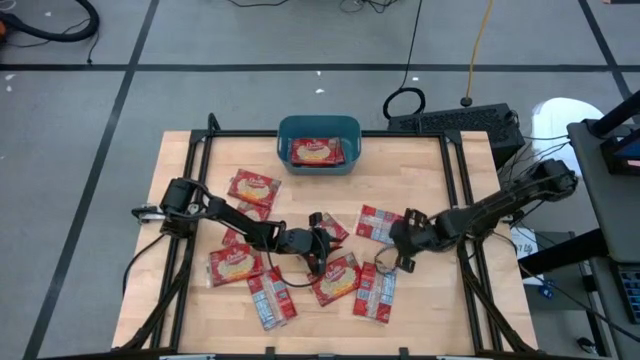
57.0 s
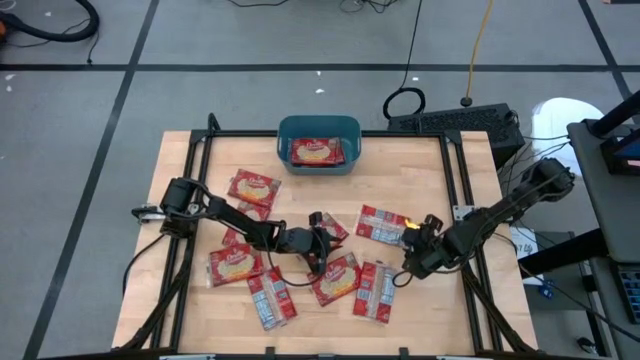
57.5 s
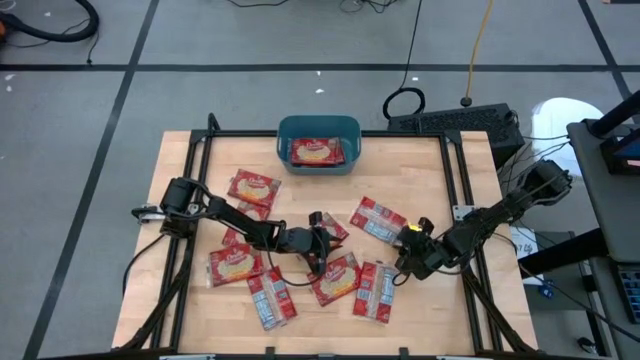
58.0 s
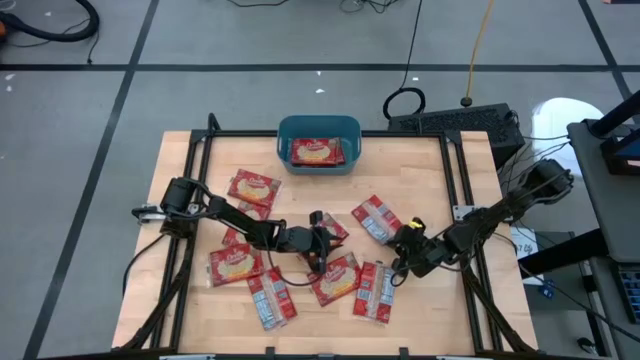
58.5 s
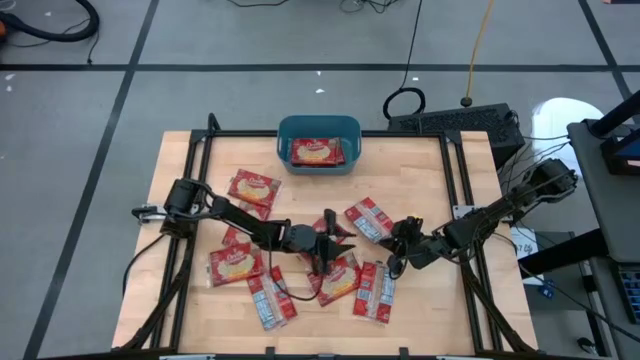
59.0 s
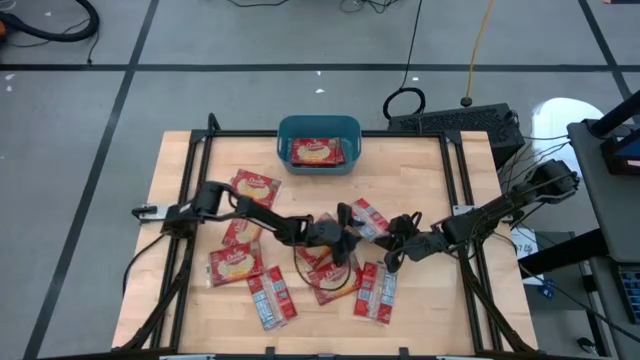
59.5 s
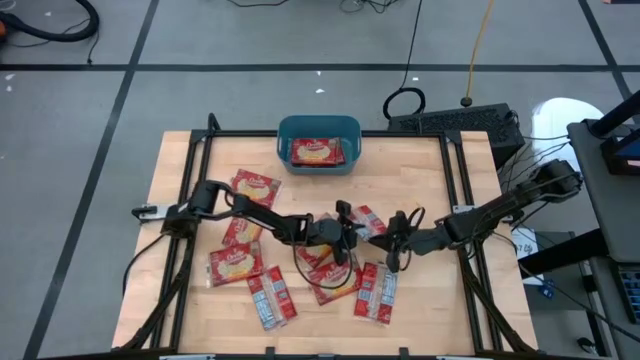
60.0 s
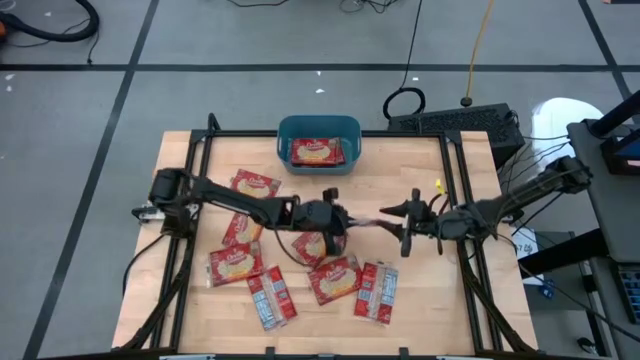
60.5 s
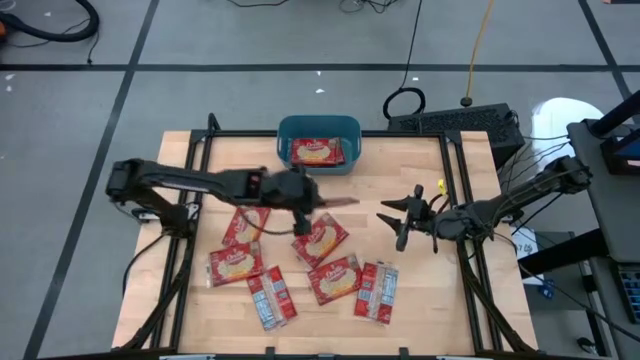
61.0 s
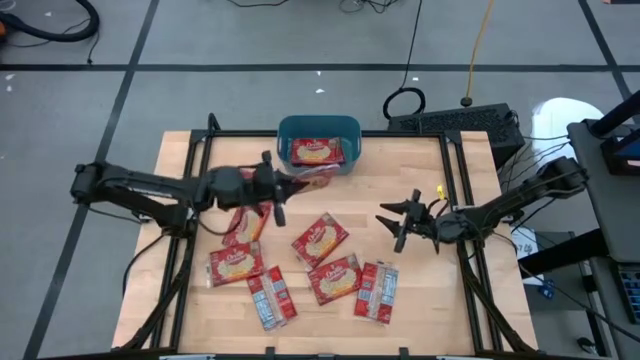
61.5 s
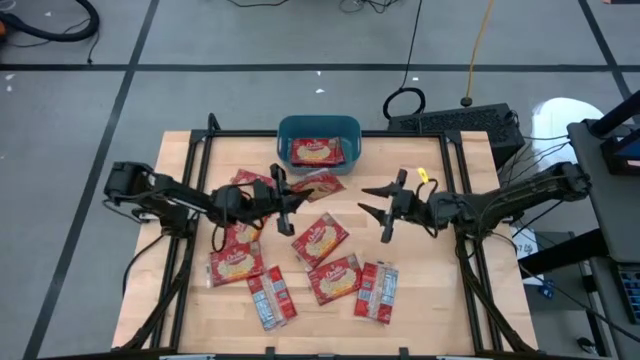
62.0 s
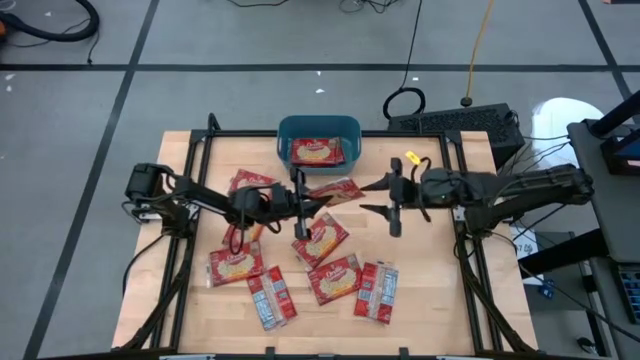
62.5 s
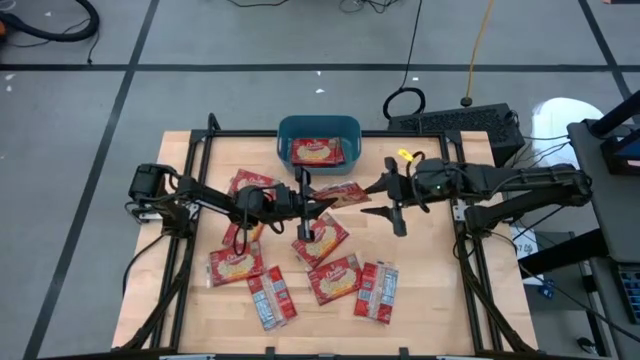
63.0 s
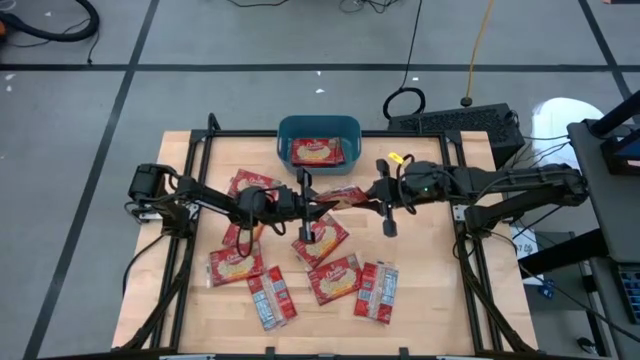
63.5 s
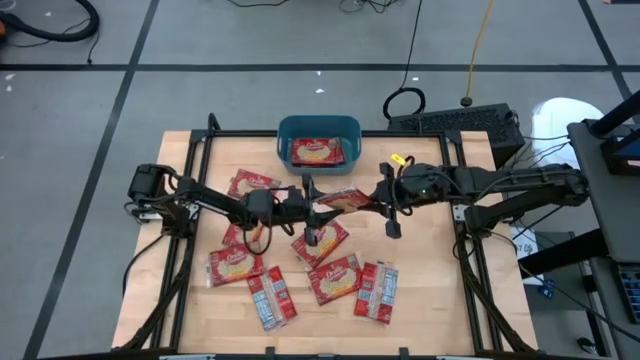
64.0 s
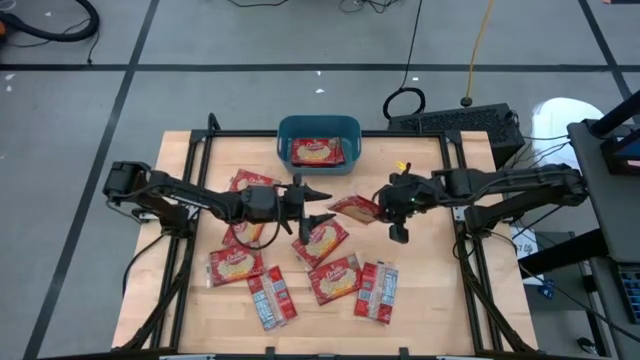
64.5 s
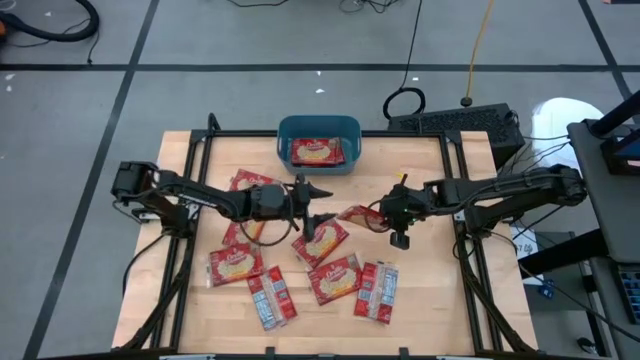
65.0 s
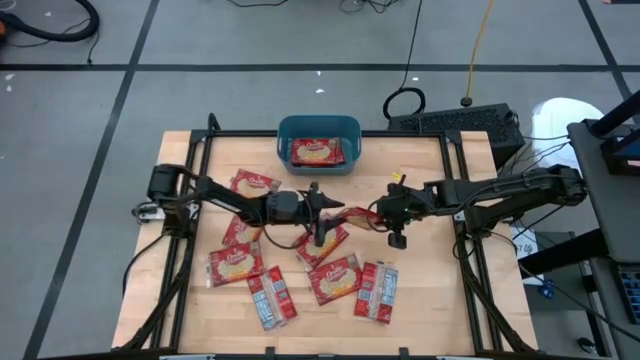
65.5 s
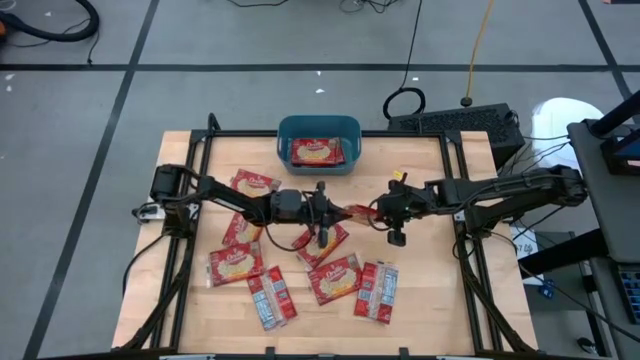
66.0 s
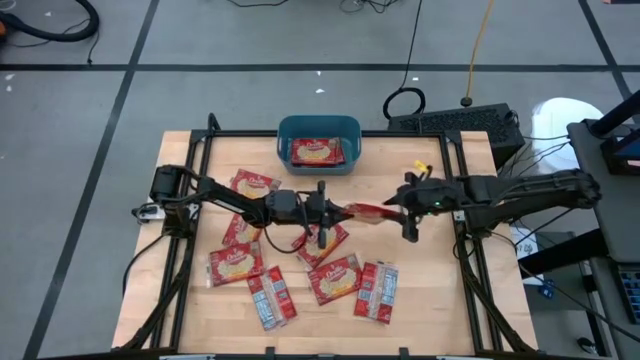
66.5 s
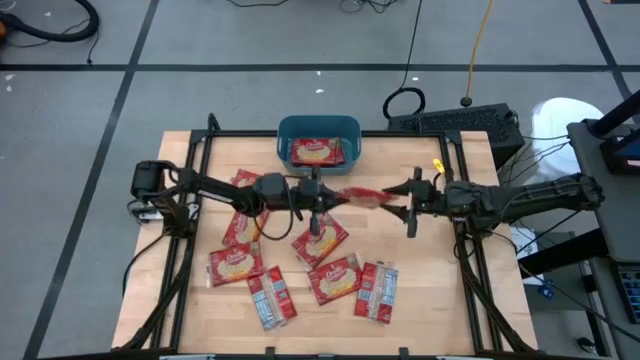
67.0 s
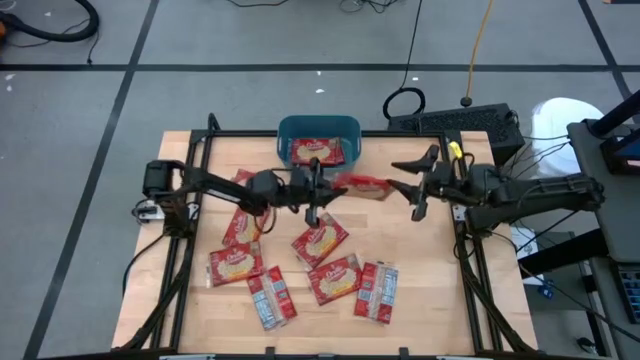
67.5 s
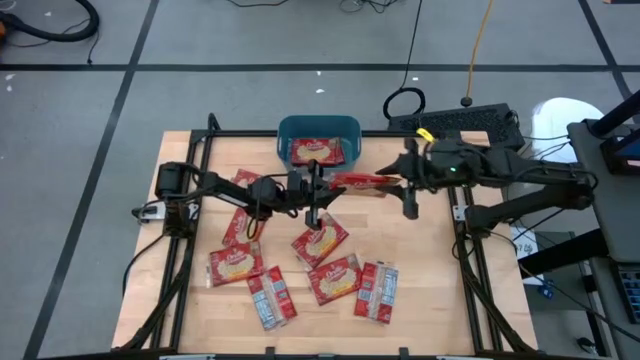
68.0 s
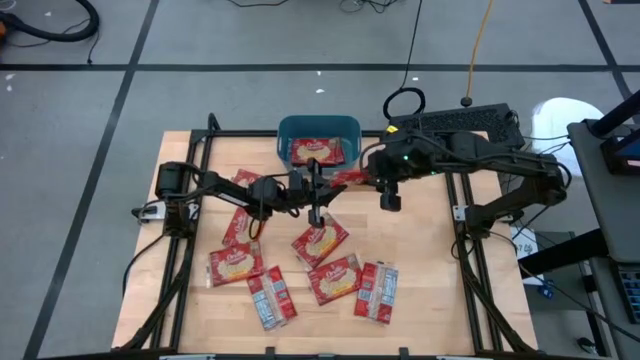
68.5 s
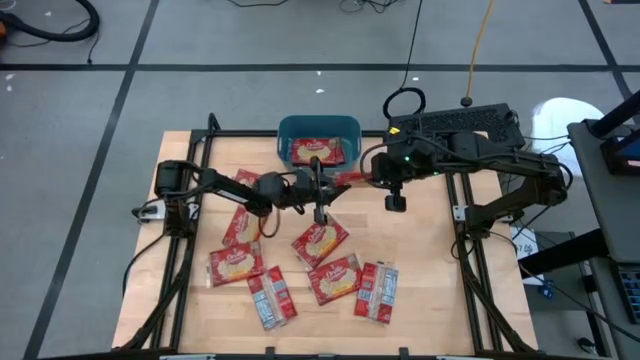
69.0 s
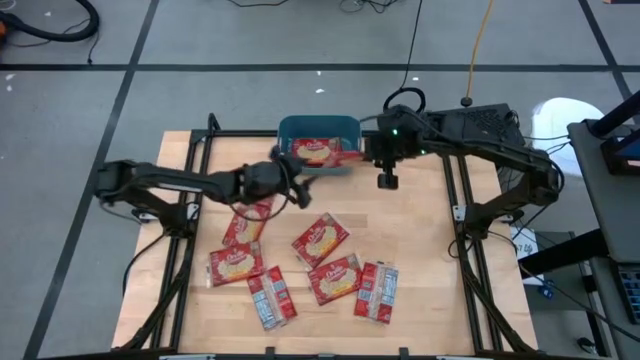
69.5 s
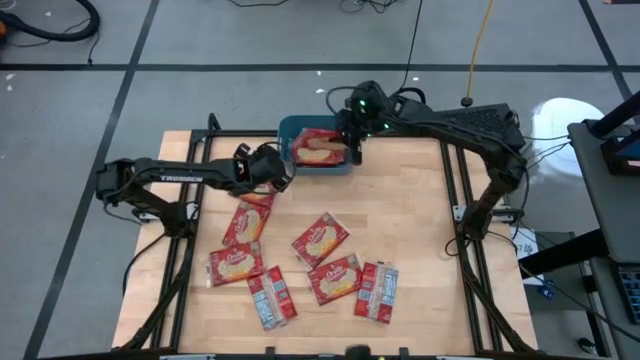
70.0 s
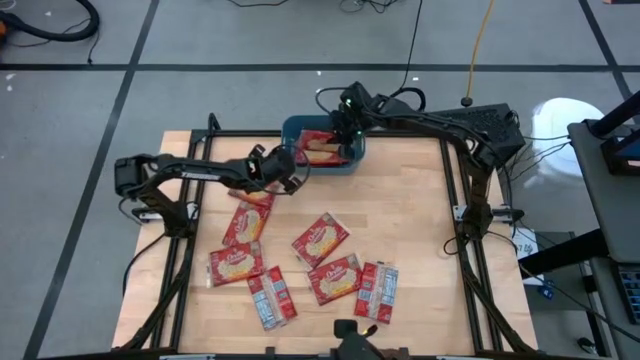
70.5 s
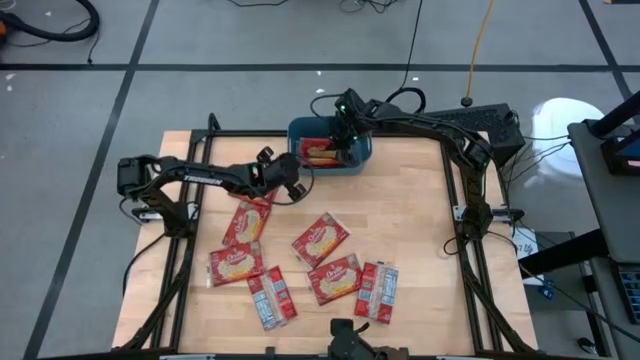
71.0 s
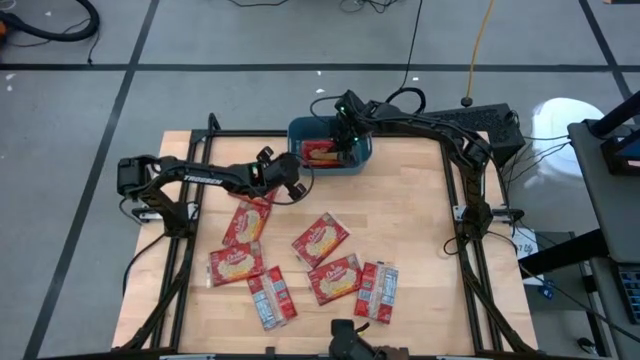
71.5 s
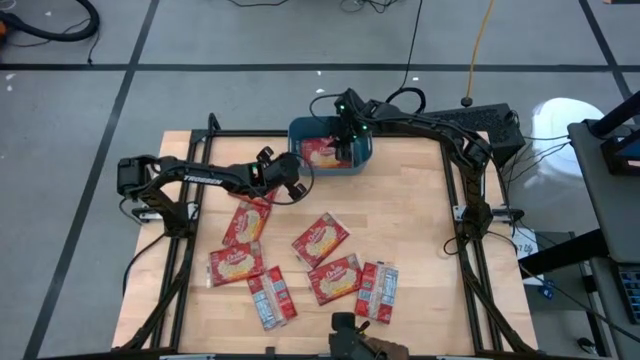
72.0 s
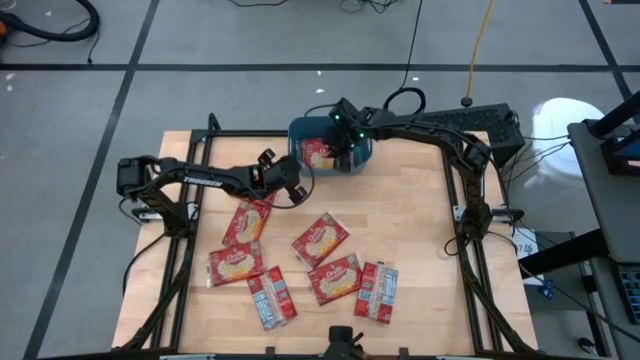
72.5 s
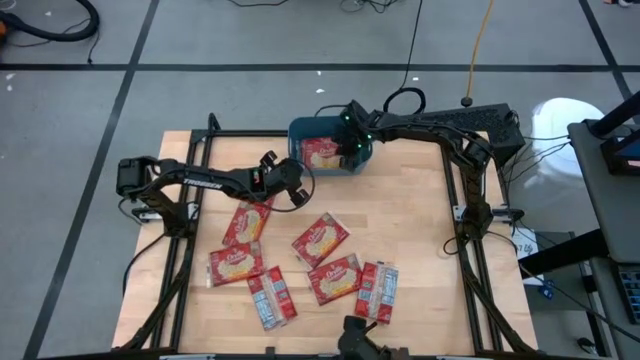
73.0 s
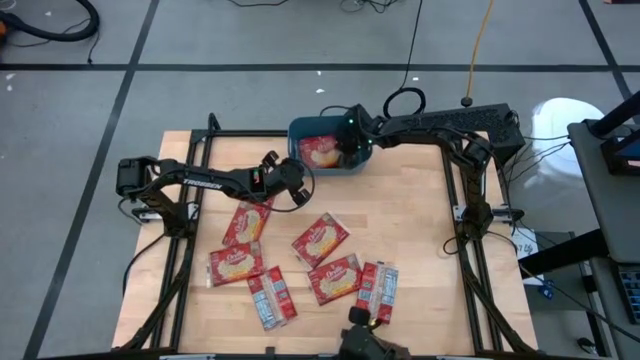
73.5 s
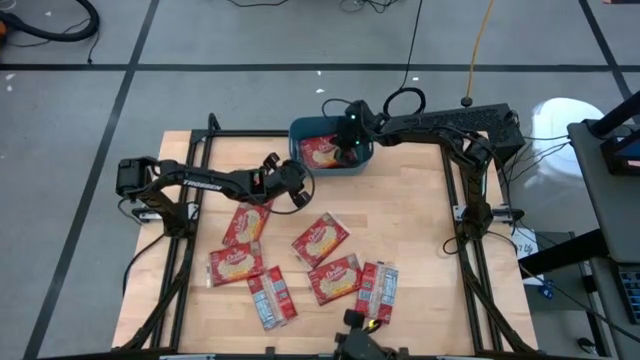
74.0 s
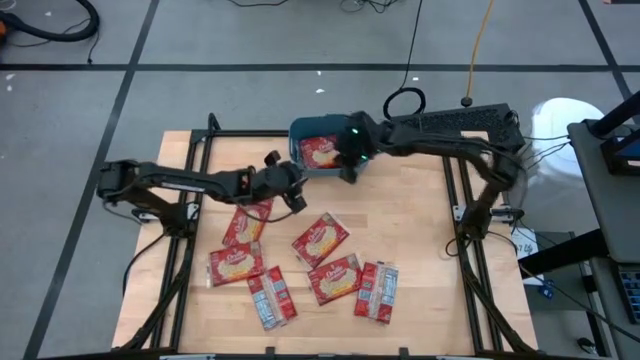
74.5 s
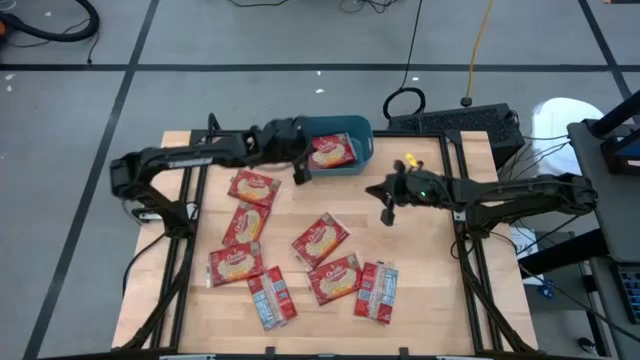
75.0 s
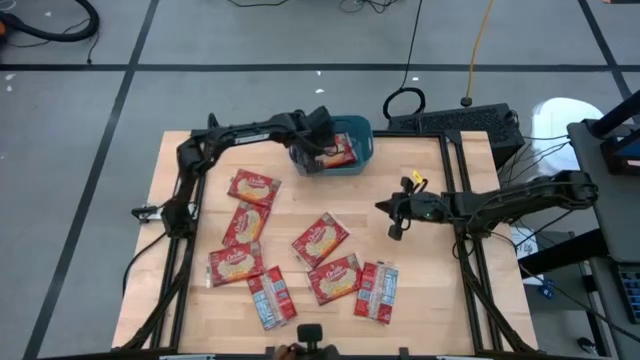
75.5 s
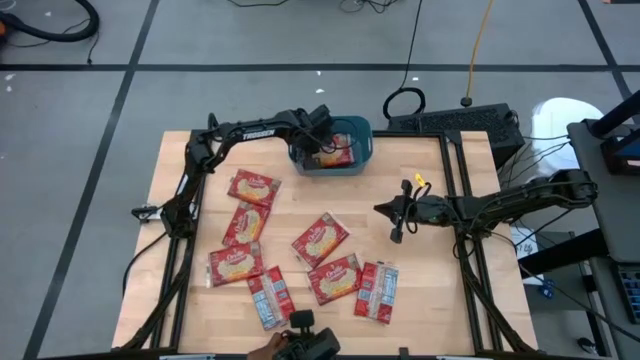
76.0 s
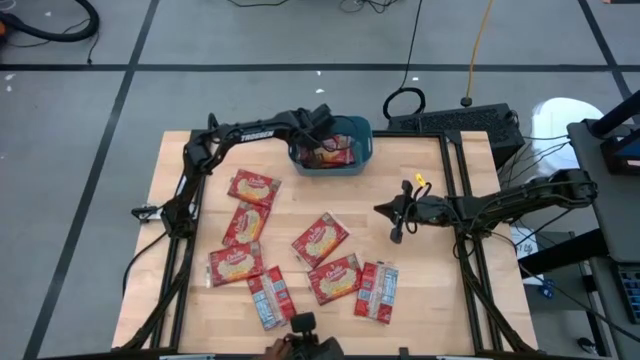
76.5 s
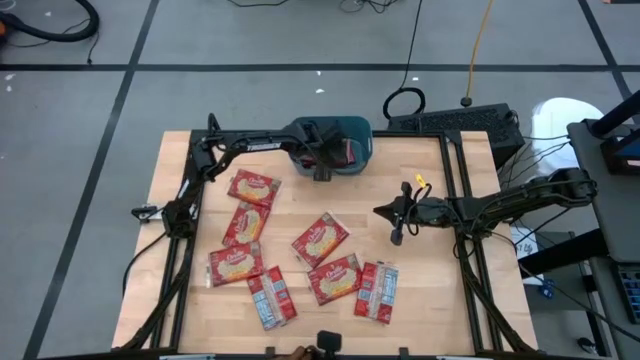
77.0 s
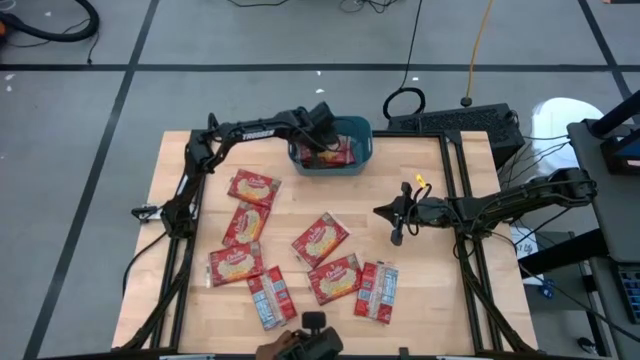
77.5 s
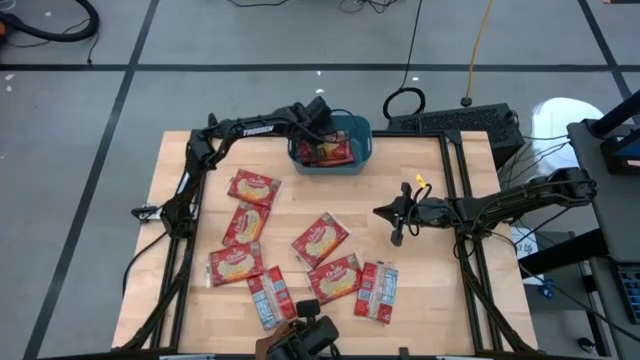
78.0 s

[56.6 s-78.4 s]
Task: Sort popcorn bags into baskets
Put the red popcorn bag into the blue bin
